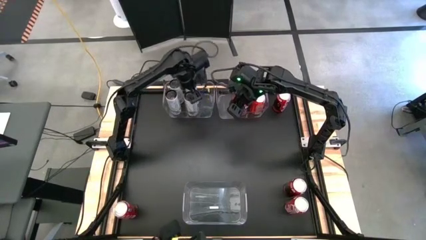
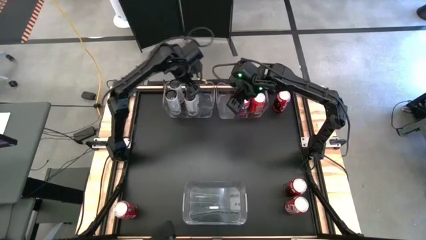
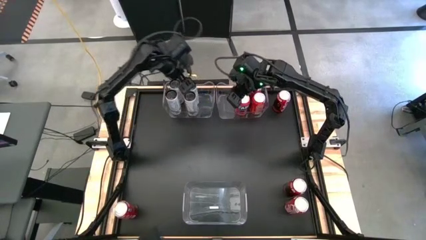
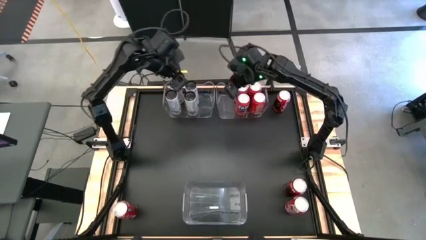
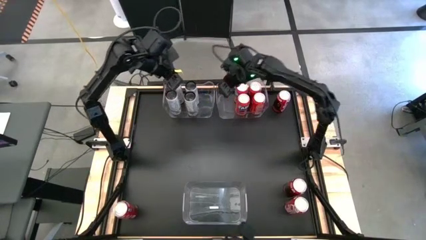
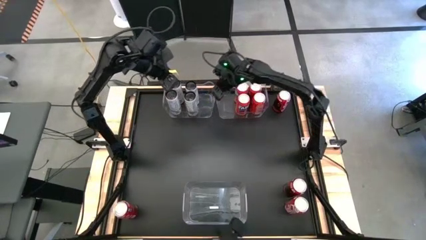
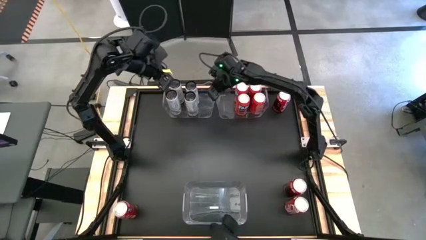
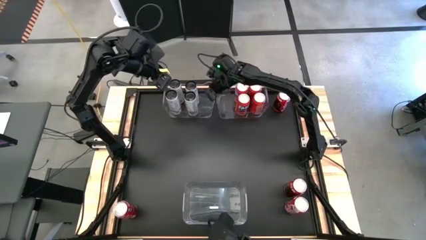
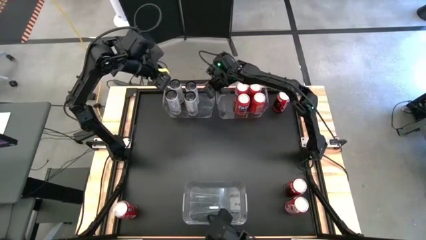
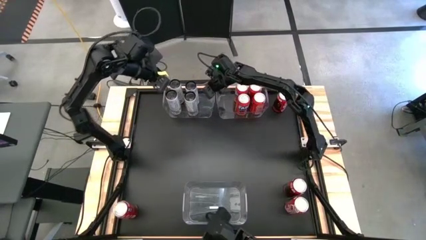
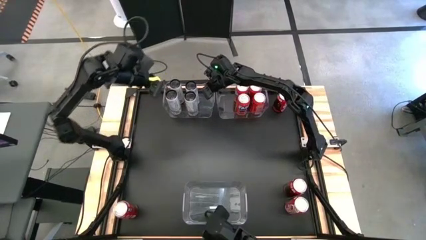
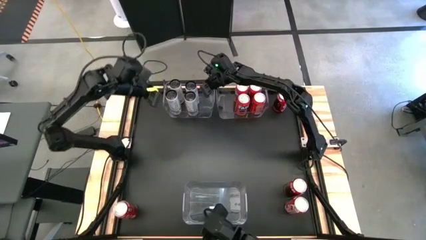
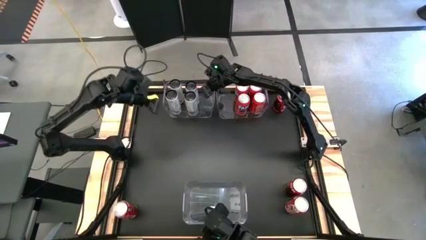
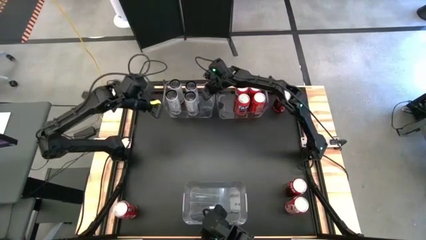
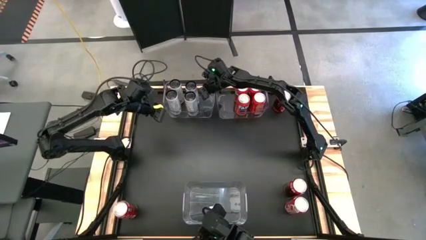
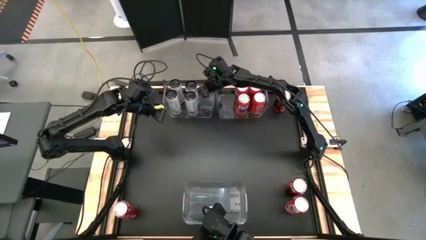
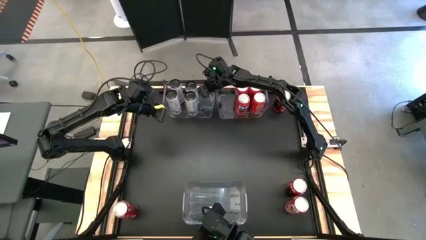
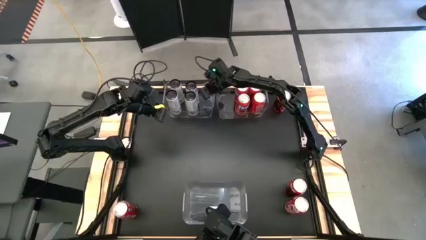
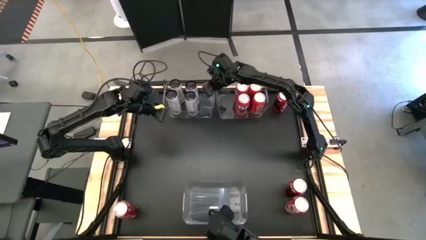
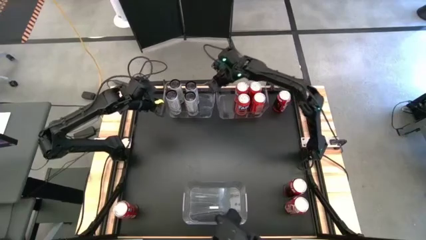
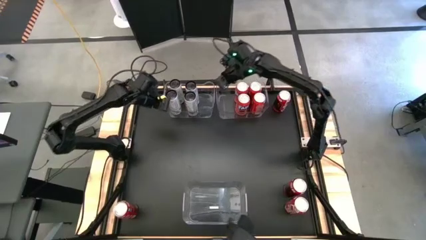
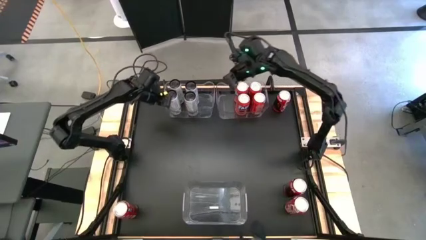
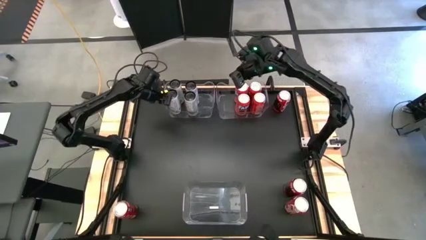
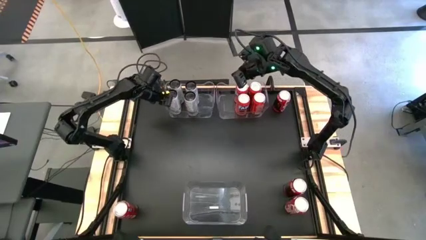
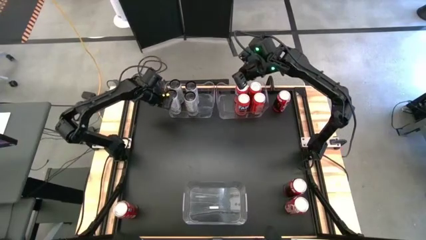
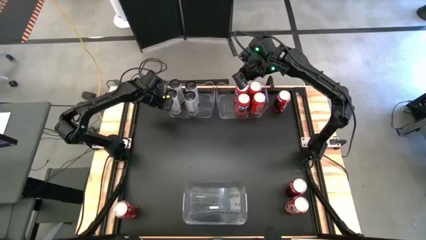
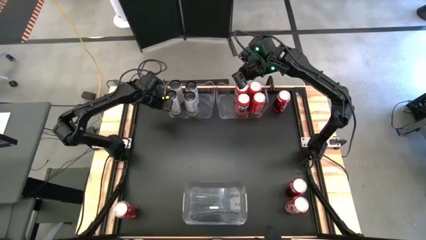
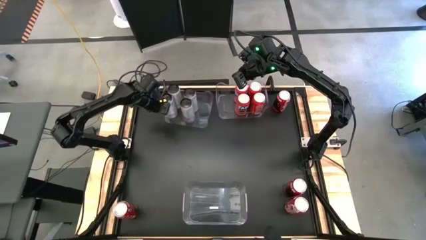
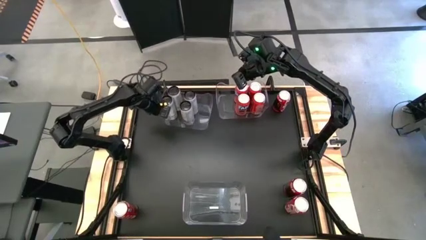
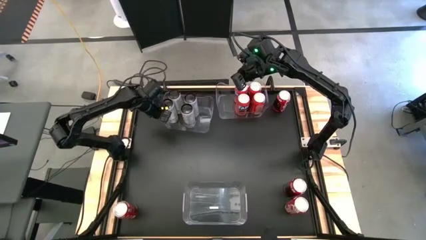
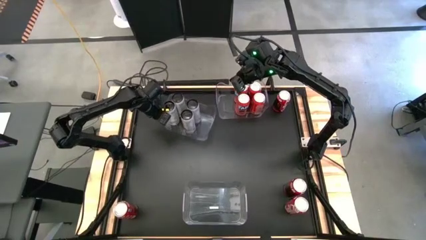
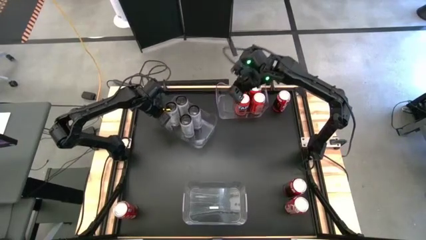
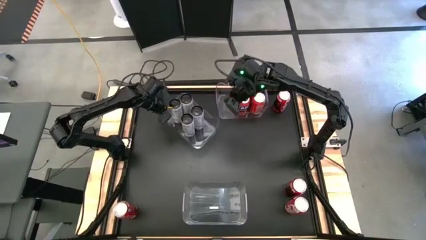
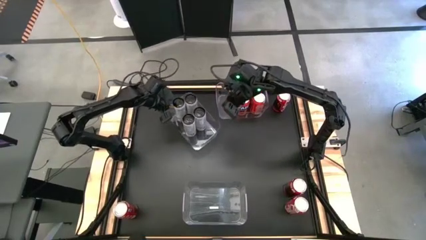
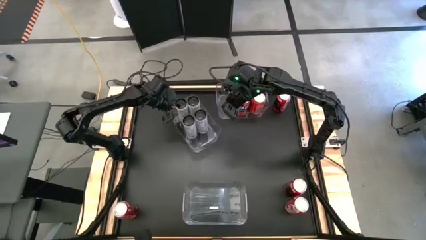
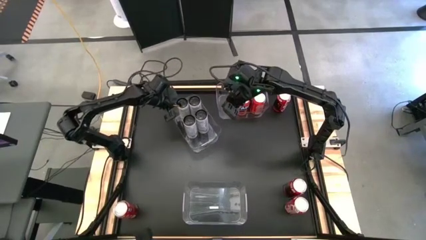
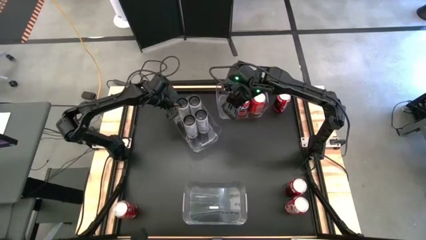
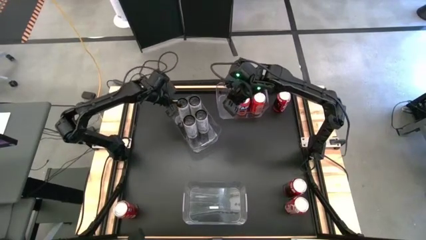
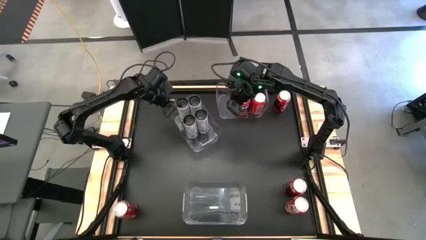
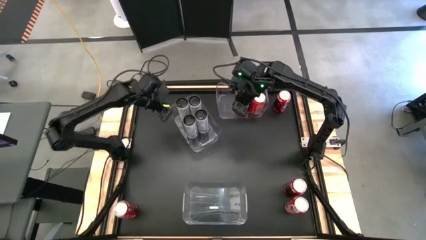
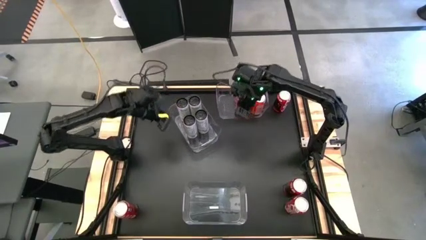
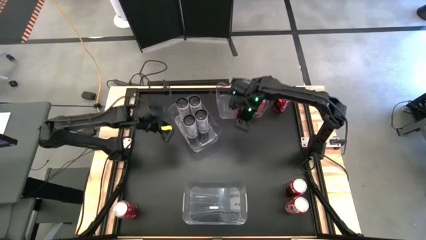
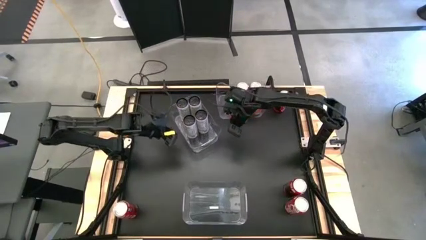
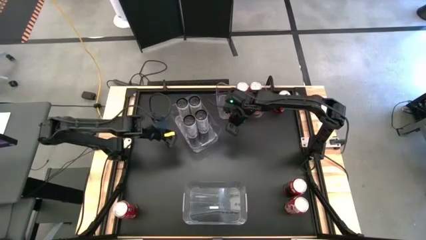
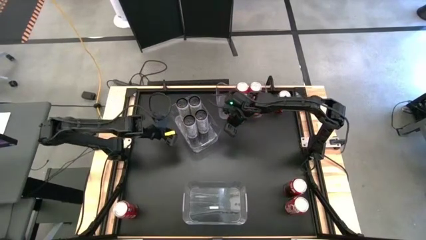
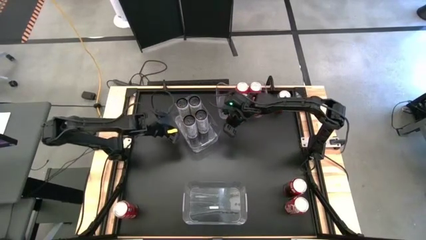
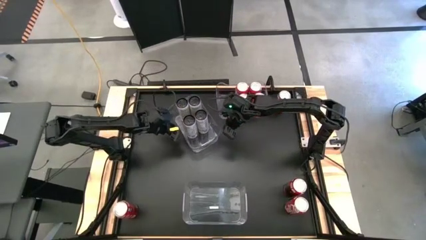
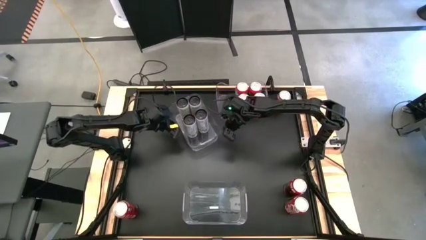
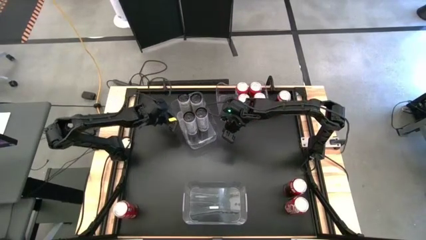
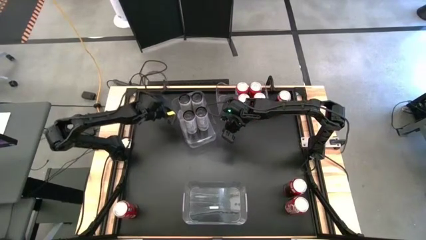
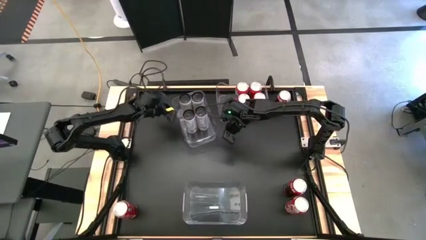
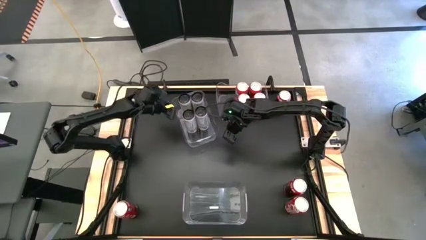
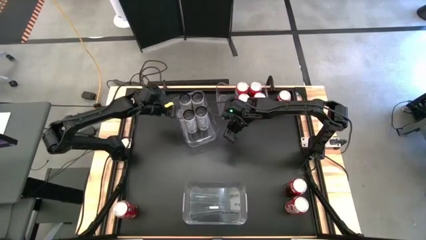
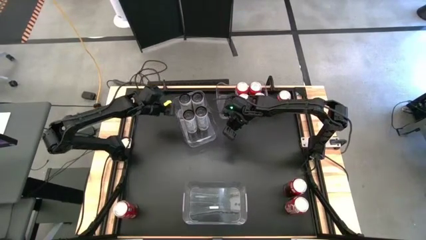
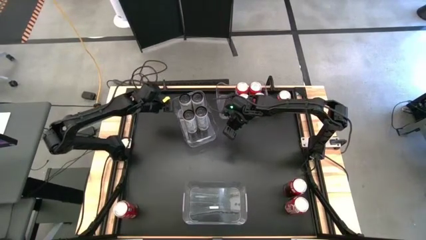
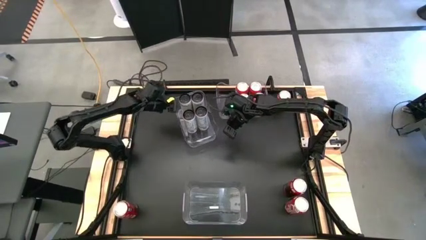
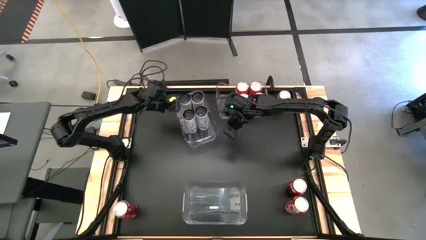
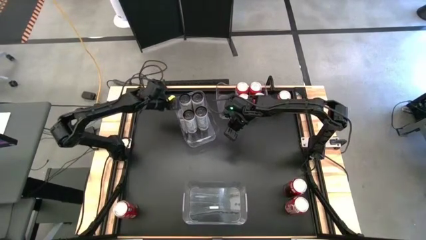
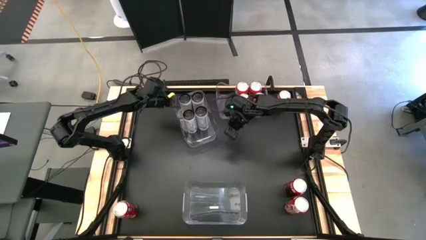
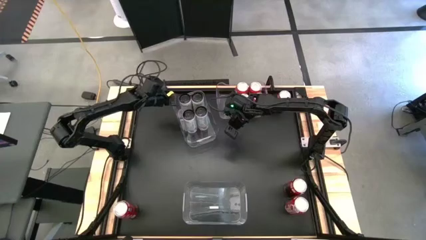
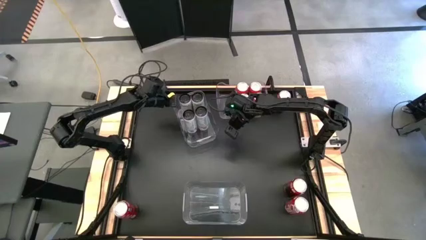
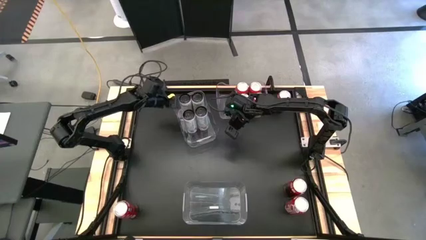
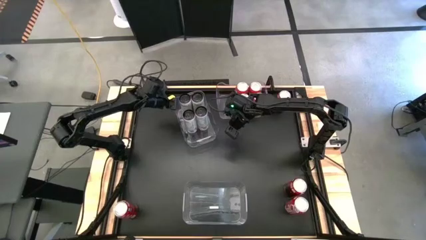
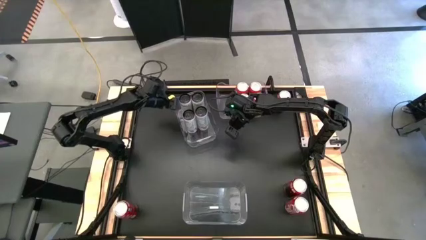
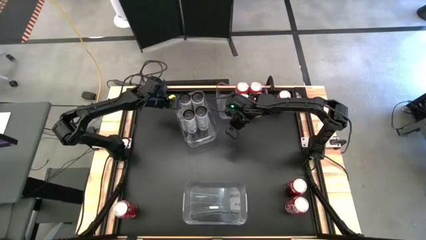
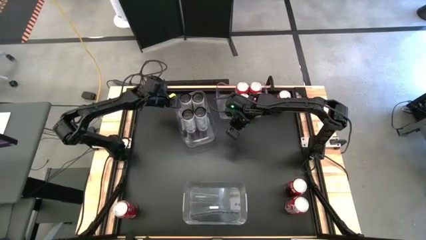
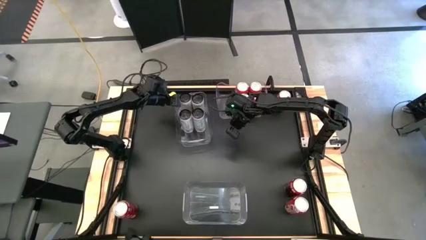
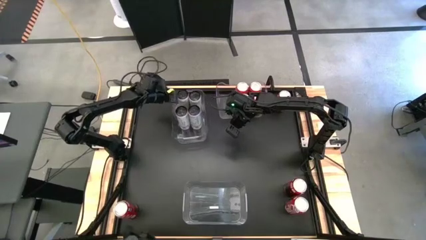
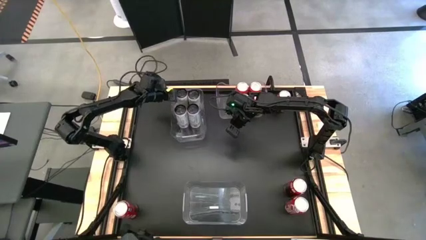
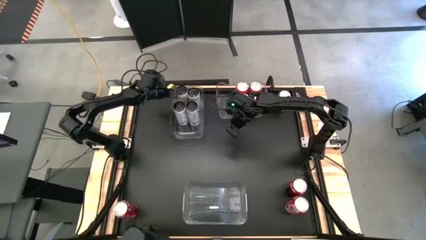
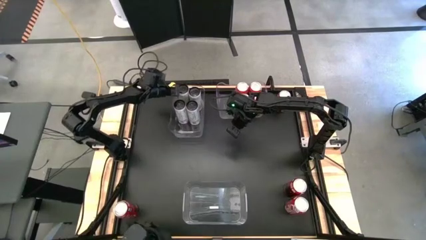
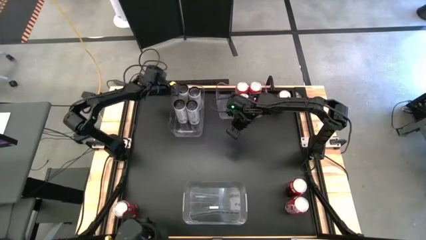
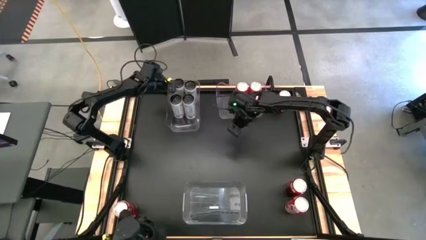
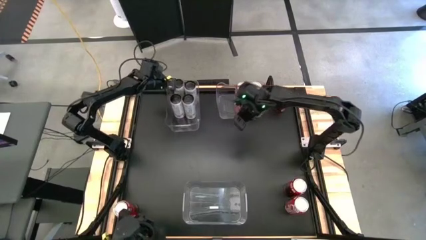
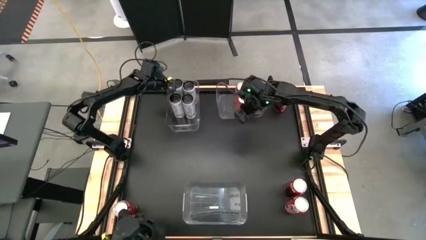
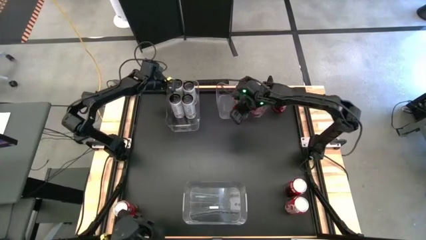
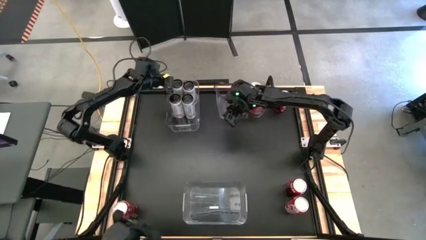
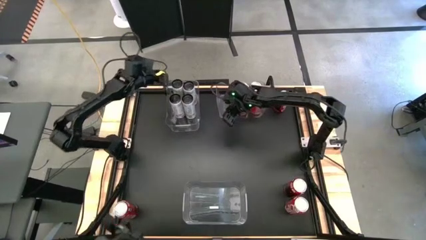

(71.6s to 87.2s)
Task: Sort soda cans
Adjust the top transparent bin
